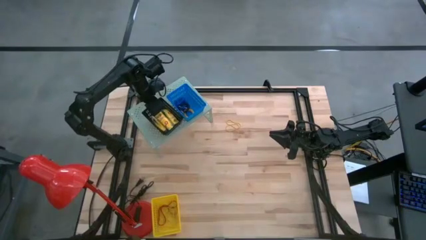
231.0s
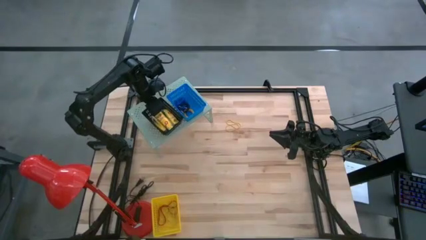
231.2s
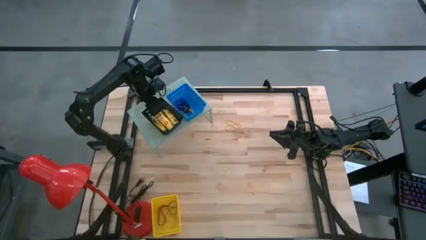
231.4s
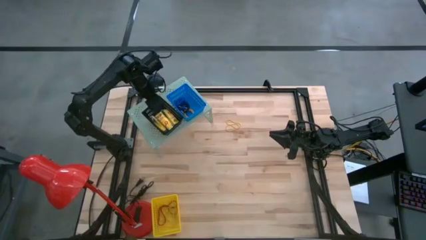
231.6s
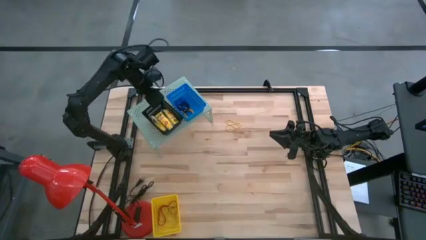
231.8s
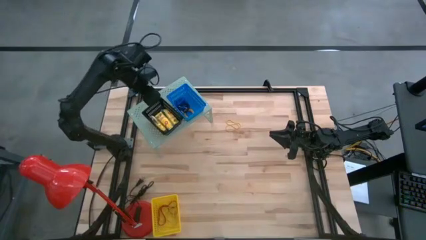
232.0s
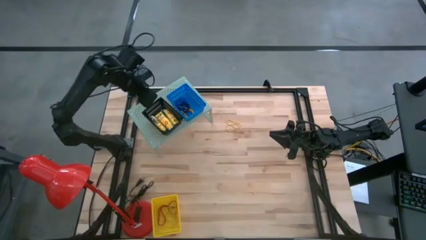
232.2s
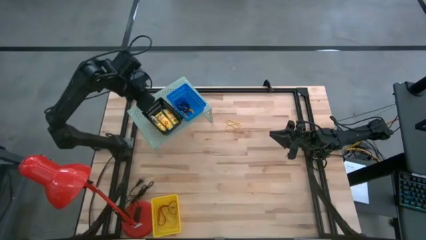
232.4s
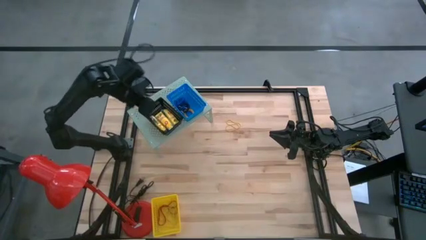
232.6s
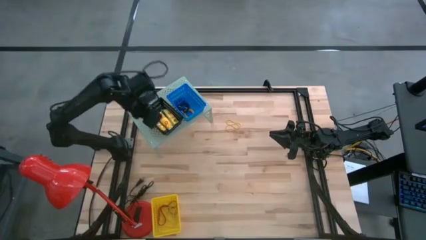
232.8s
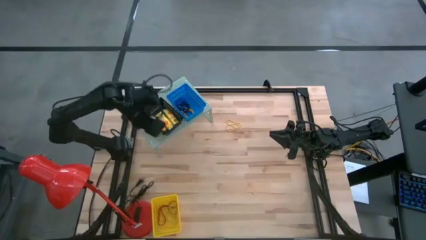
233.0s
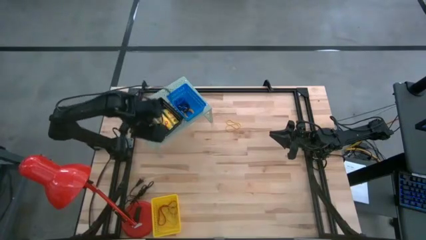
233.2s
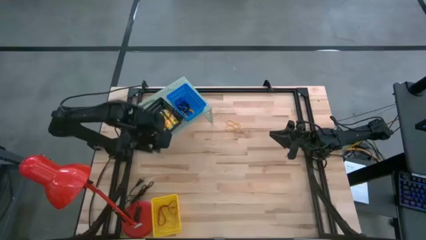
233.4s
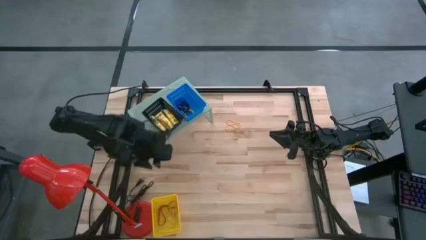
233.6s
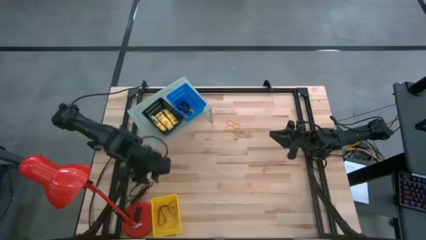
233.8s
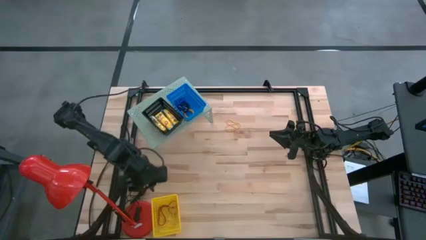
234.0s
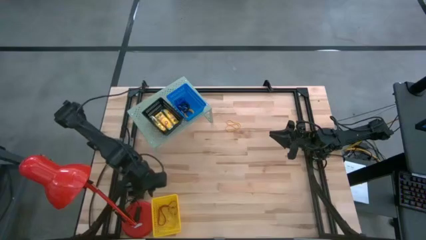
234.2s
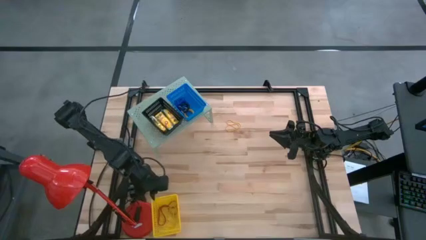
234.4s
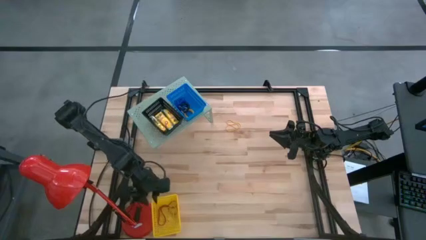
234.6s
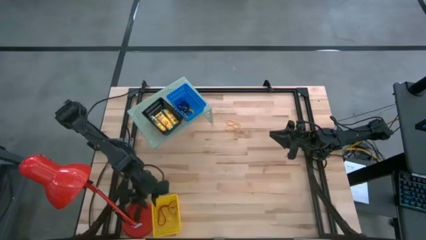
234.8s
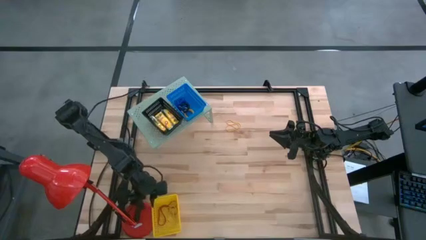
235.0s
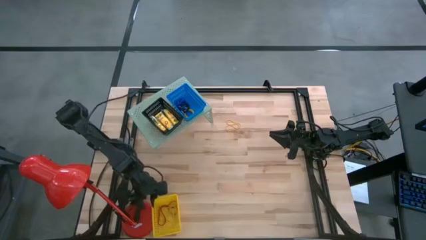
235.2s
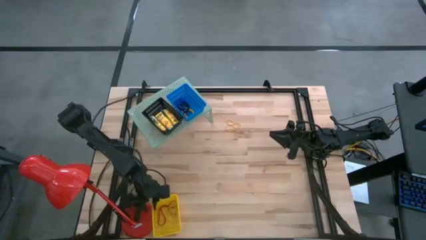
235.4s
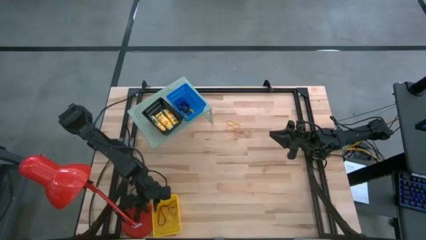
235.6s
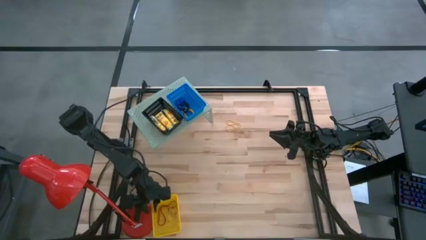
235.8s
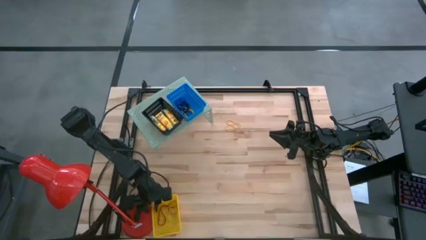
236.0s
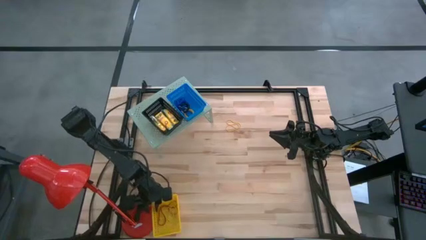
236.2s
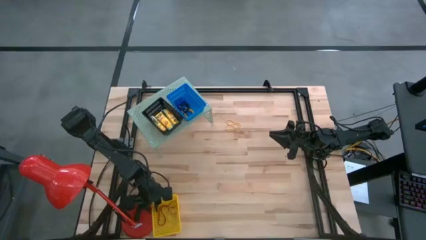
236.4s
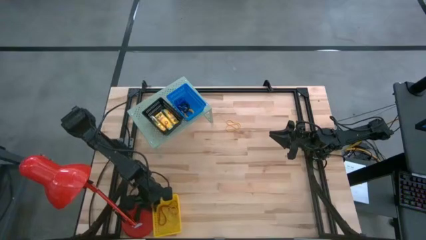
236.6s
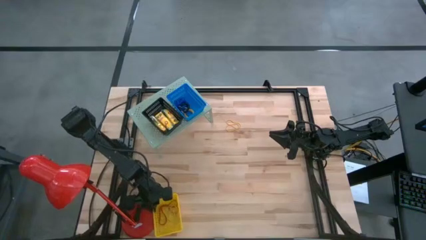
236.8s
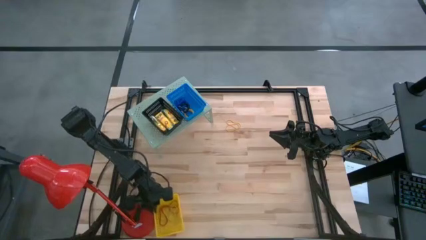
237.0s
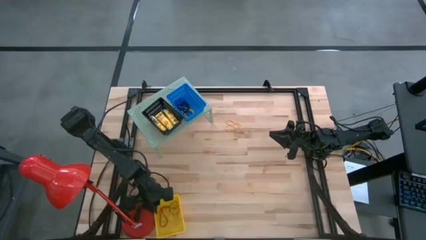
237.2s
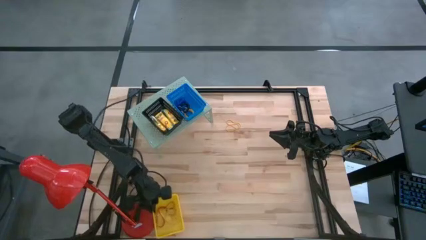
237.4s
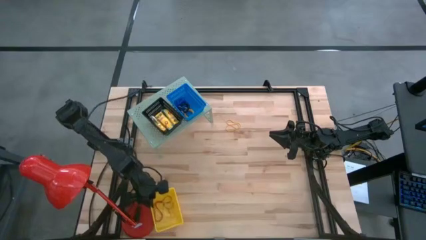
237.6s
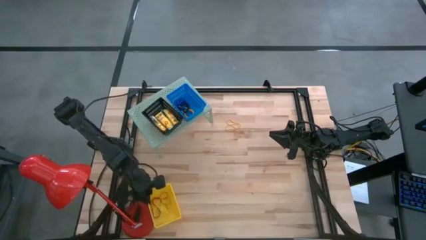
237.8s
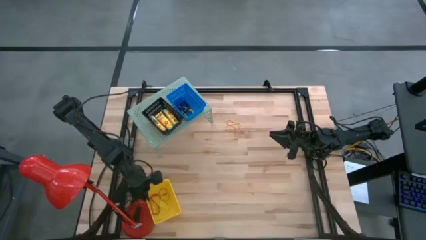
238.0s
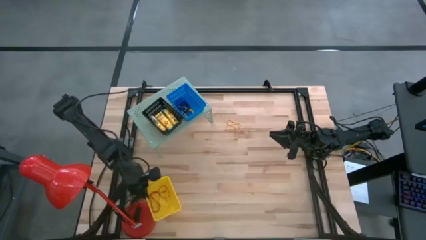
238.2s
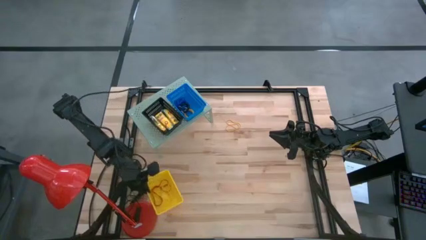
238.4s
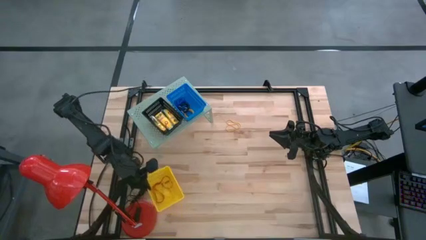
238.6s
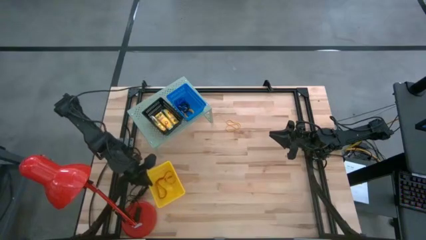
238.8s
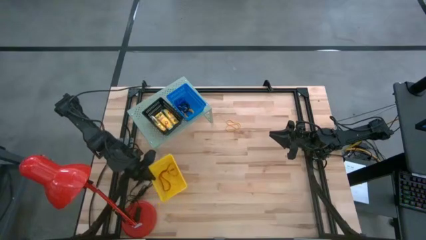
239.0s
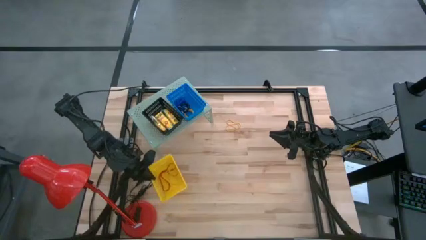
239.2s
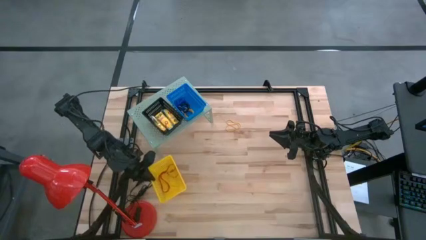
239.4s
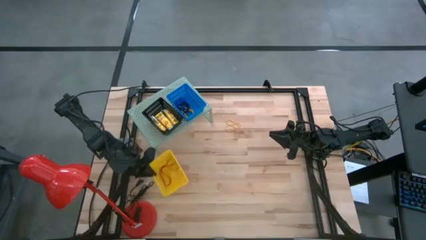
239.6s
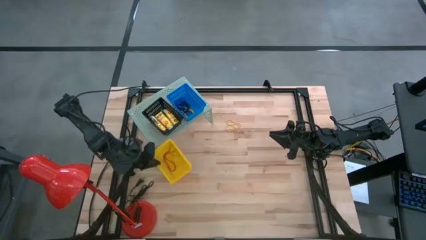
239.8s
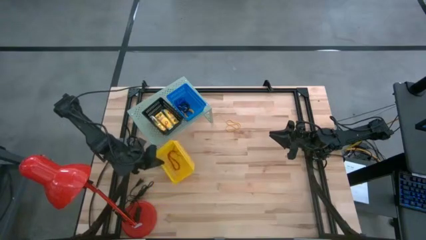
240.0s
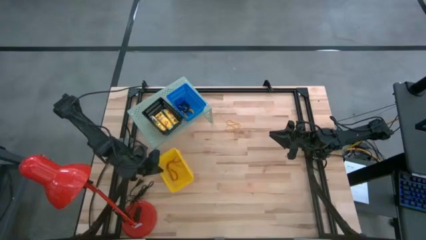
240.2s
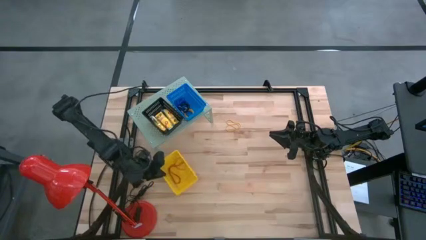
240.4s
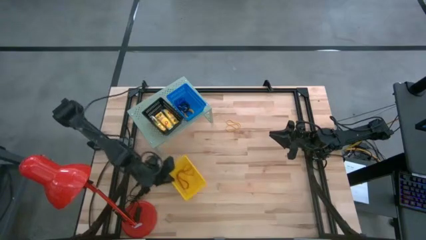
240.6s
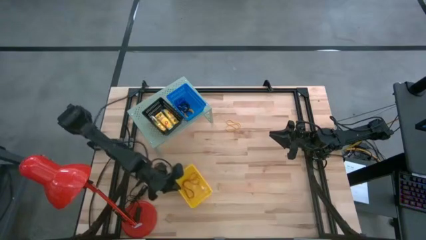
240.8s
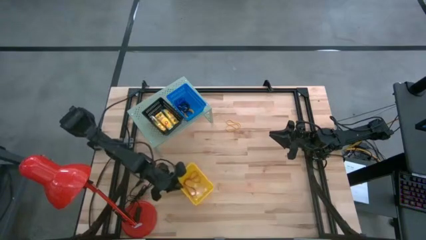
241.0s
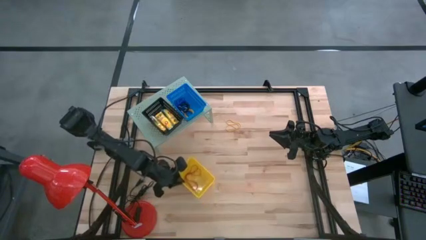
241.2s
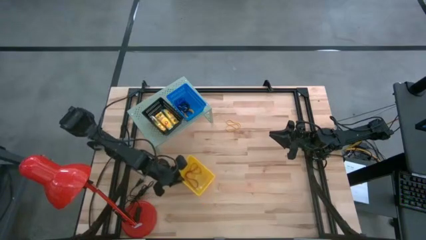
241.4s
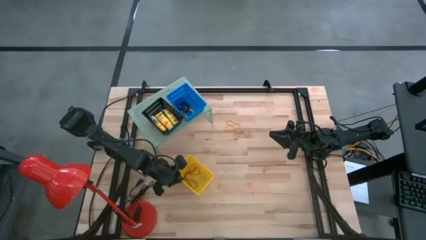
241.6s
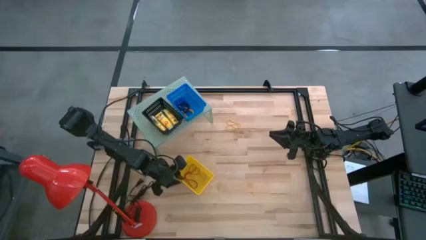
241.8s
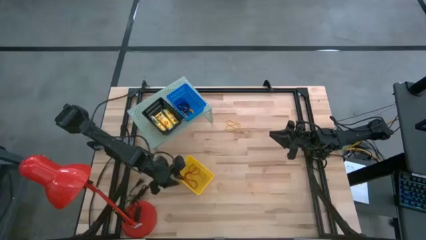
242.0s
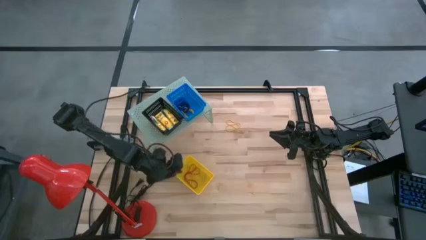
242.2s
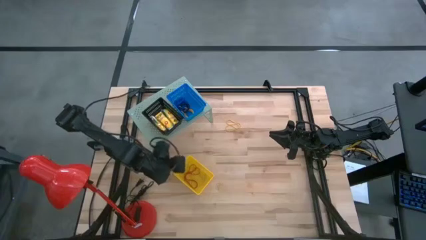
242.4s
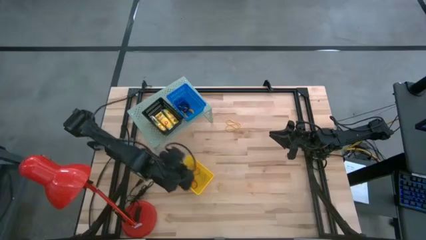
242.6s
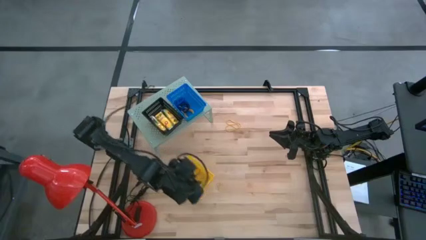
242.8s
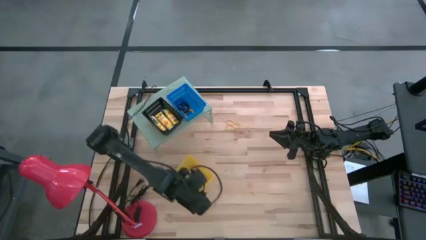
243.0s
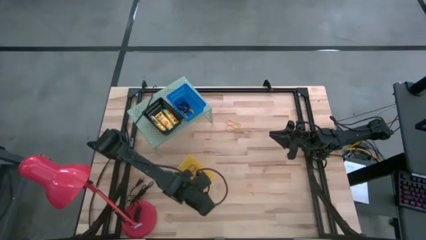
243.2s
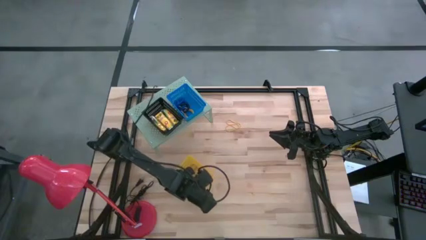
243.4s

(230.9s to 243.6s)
Task: Pick & Place Office Desk Supplies
Put the yellow basket on the shelf

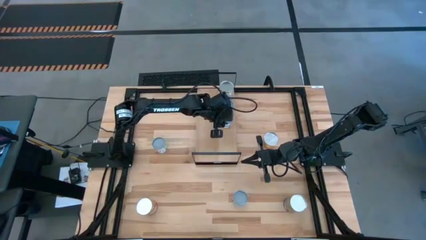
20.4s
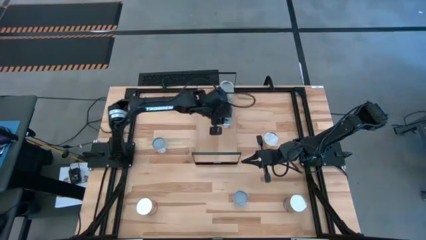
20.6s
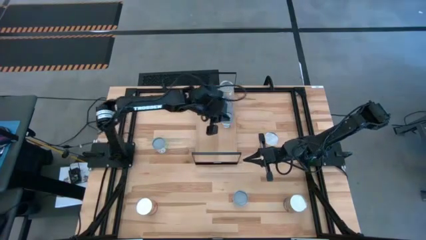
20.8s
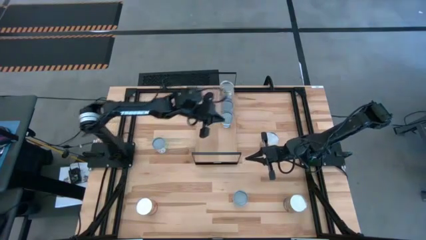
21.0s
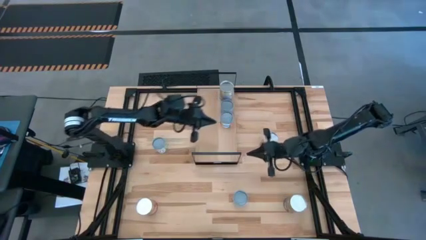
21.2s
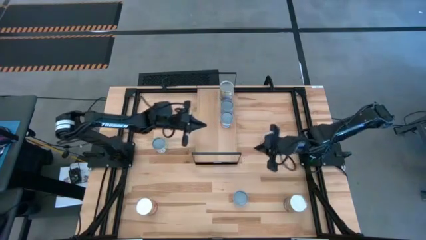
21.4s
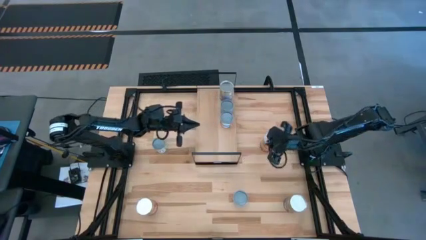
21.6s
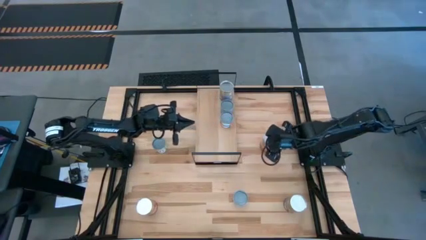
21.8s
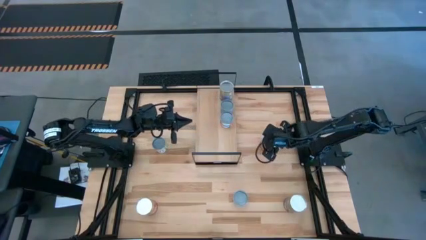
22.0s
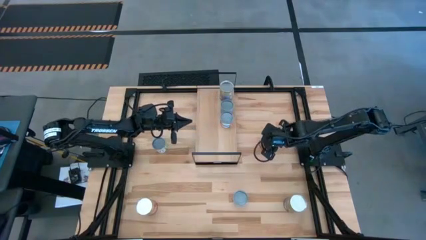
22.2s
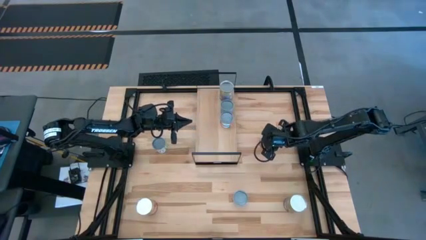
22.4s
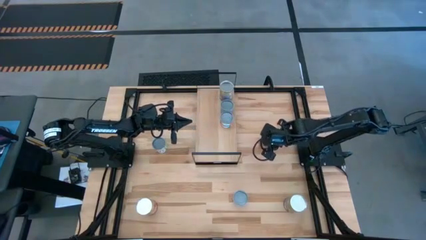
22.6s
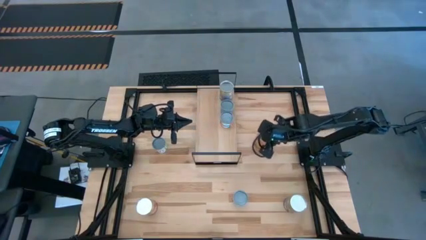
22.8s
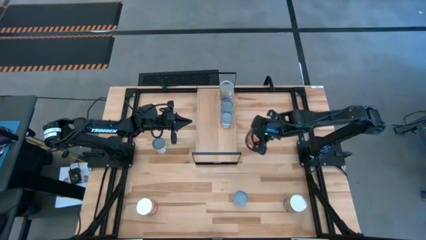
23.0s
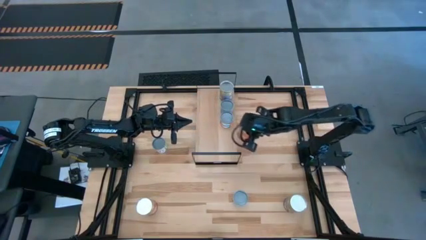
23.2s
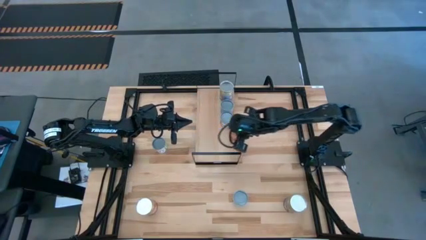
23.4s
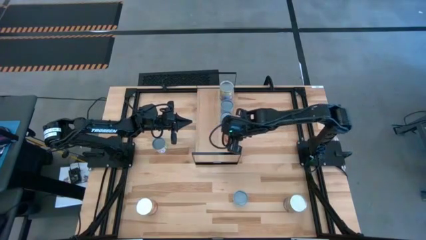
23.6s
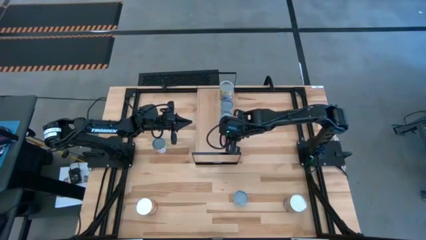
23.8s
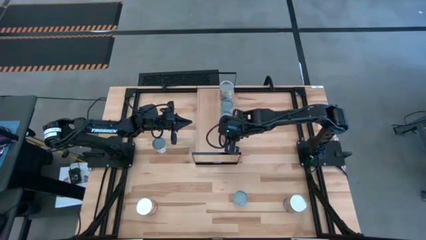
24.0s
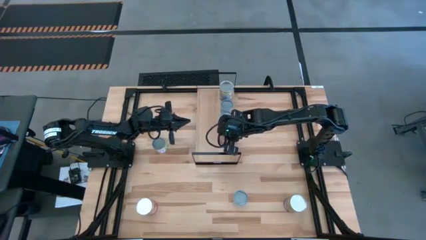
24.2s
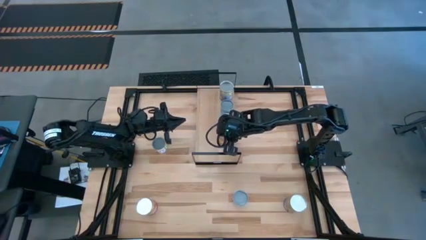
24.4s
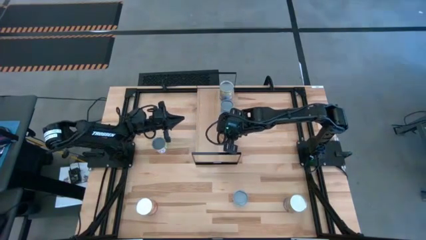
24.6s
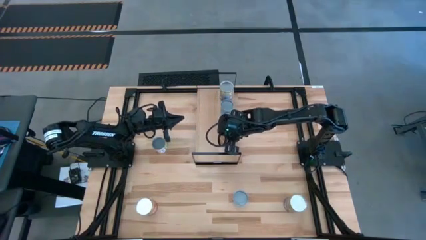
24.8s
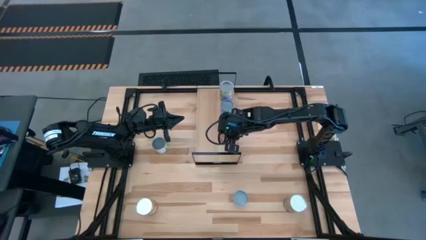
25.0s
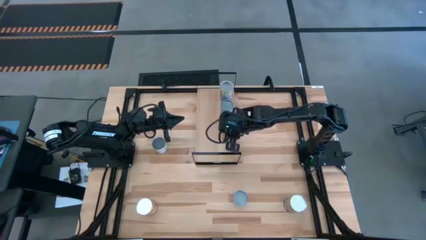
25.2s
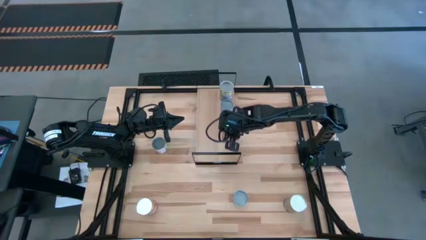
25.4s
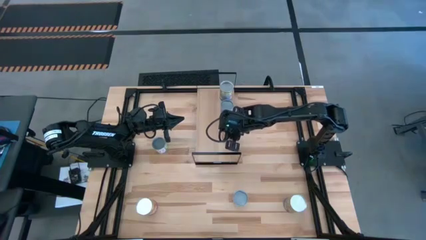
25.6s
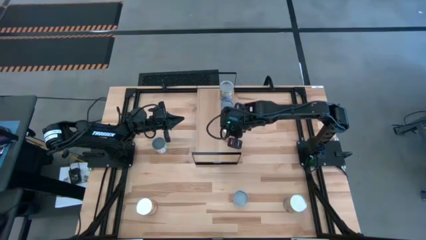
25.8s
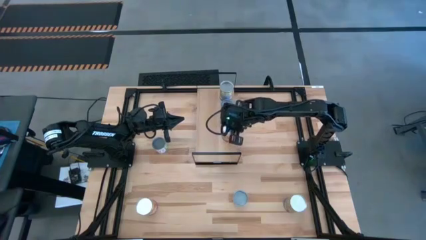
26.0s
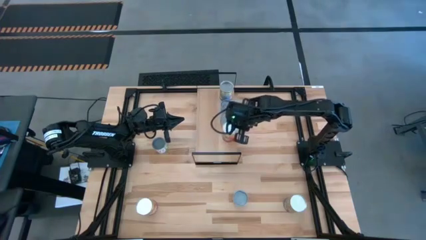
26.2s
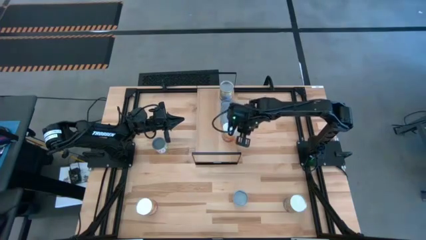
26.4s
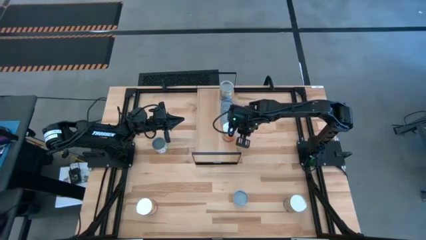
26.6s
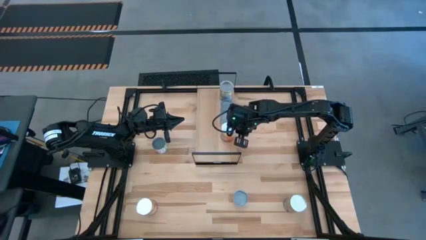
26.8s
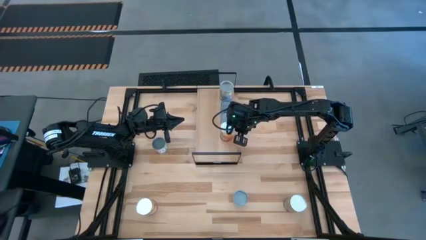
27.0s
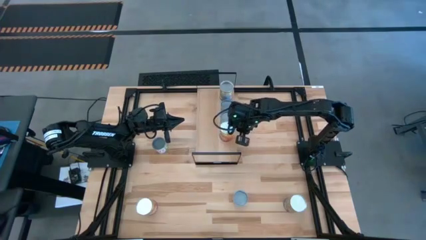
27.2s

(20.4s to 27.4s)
Task: Pick and place cans onto a shelf
Put the right corn can on the shelf
